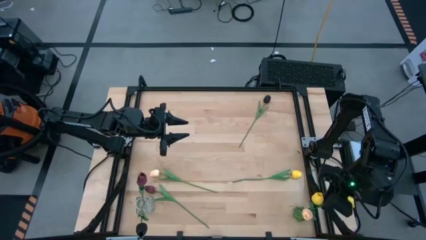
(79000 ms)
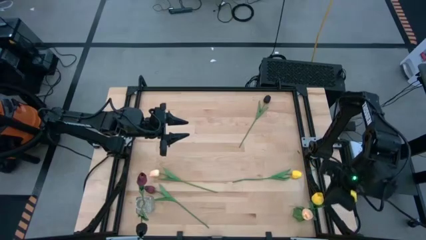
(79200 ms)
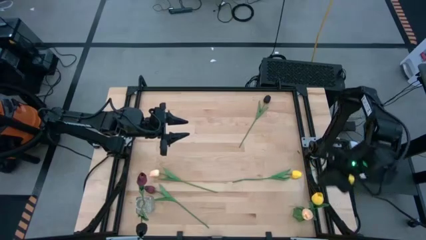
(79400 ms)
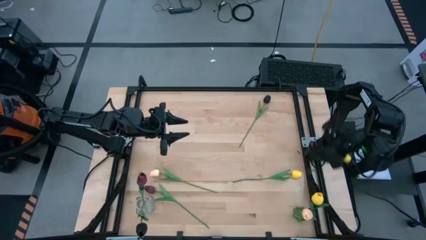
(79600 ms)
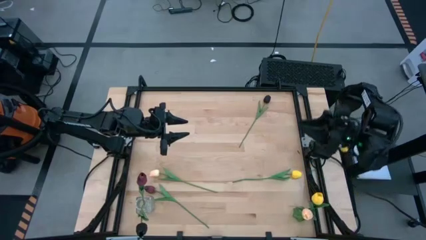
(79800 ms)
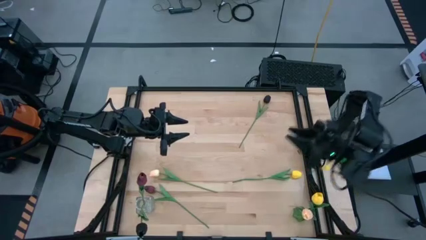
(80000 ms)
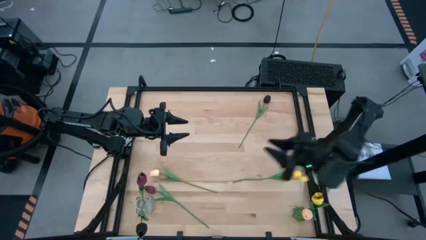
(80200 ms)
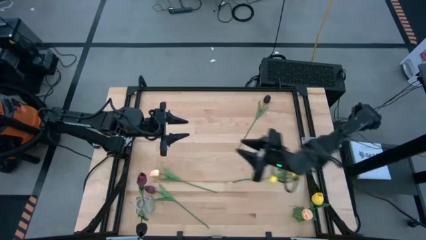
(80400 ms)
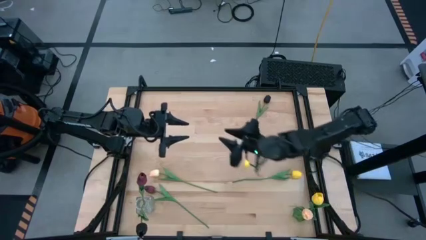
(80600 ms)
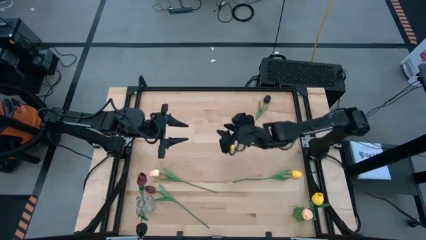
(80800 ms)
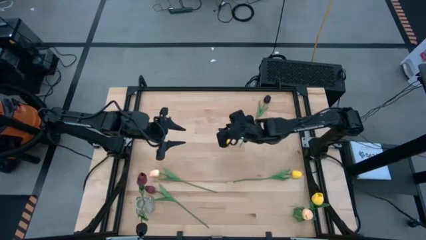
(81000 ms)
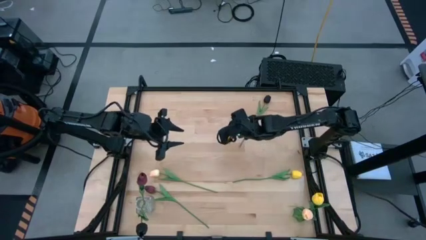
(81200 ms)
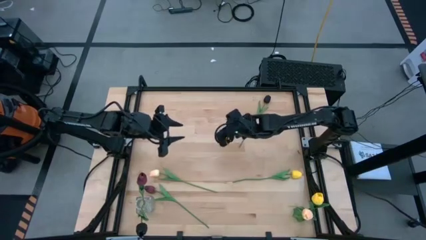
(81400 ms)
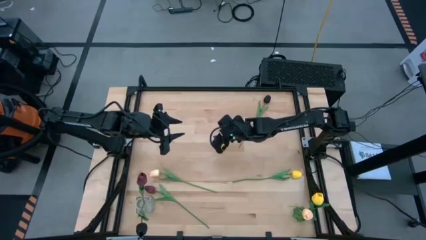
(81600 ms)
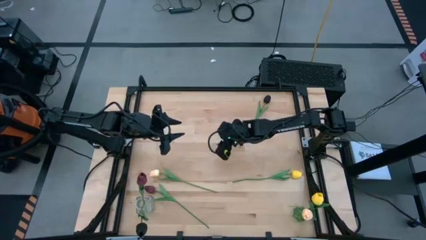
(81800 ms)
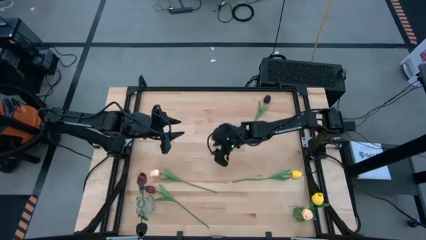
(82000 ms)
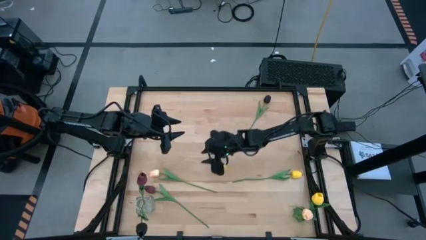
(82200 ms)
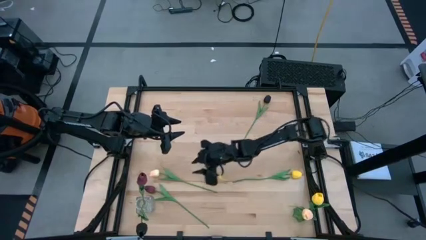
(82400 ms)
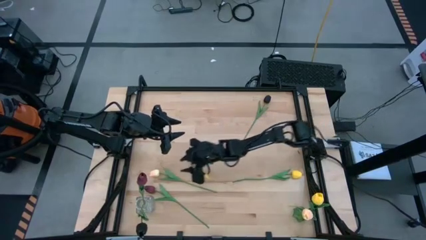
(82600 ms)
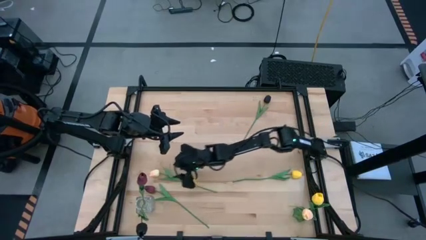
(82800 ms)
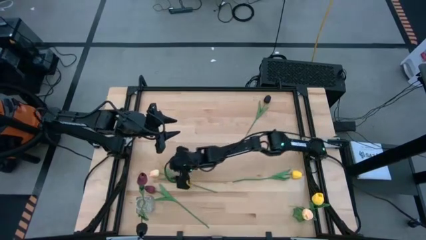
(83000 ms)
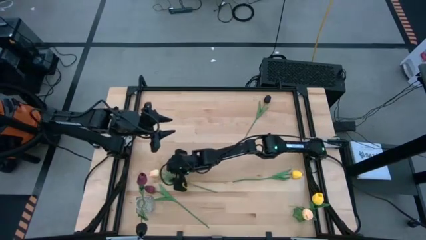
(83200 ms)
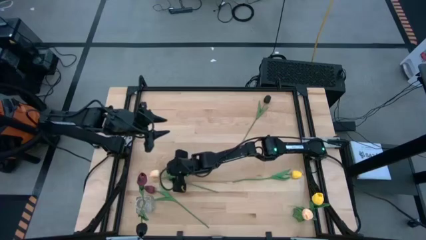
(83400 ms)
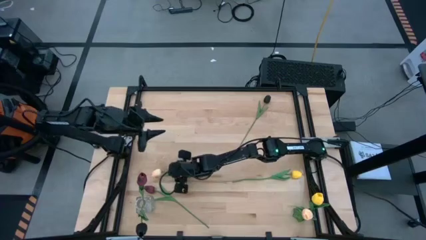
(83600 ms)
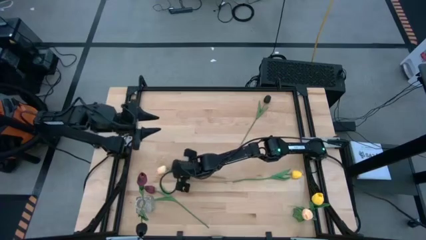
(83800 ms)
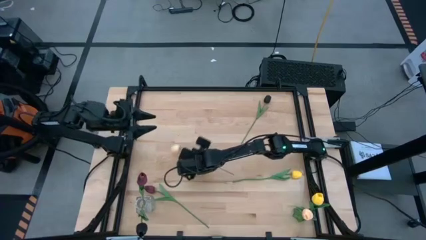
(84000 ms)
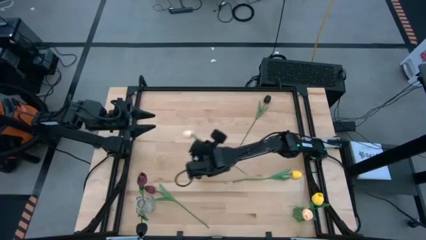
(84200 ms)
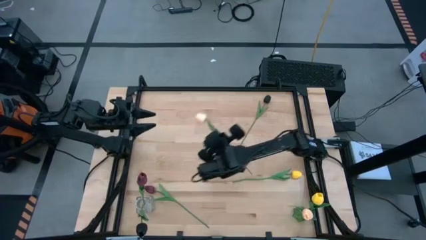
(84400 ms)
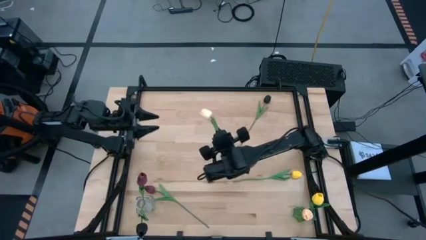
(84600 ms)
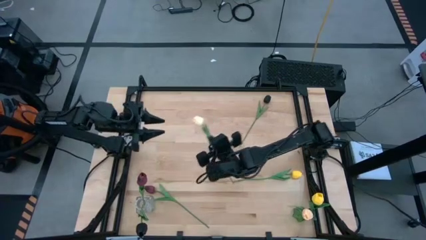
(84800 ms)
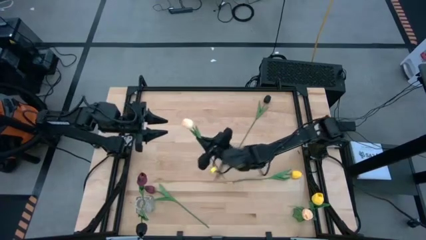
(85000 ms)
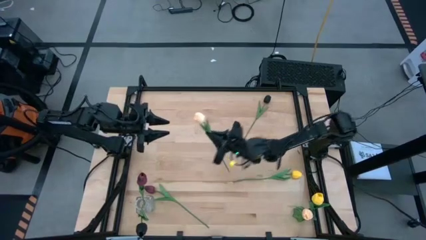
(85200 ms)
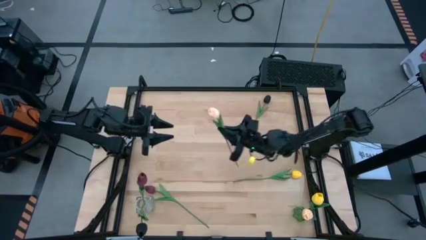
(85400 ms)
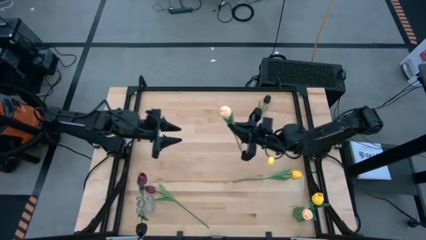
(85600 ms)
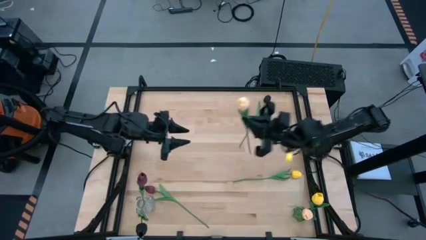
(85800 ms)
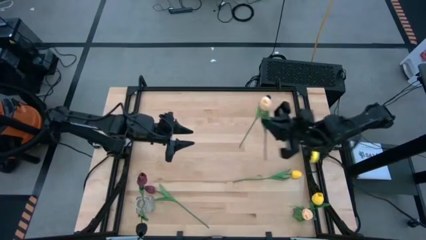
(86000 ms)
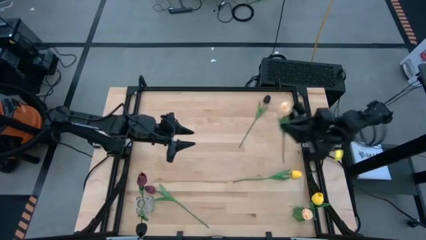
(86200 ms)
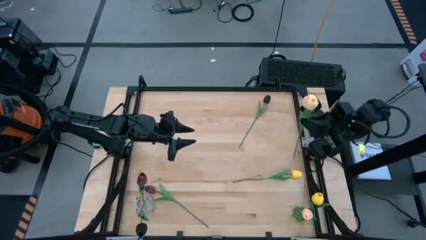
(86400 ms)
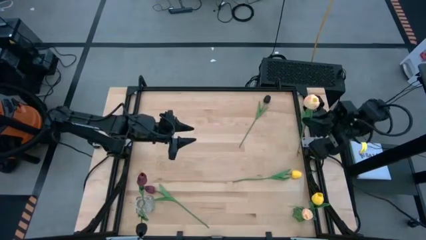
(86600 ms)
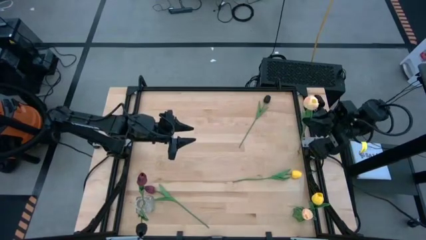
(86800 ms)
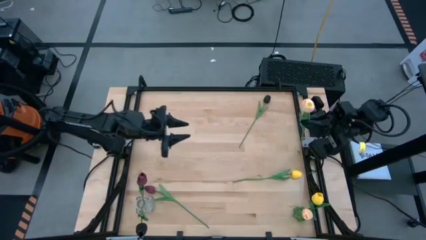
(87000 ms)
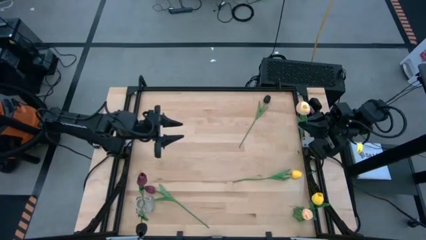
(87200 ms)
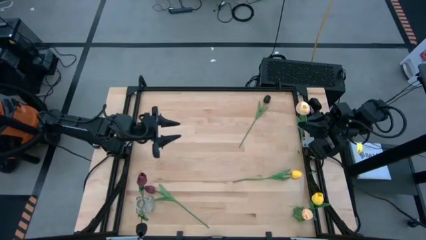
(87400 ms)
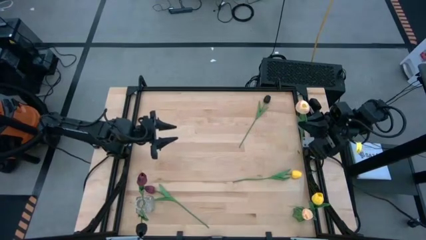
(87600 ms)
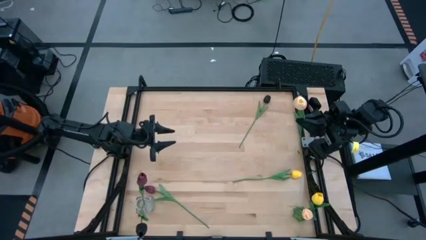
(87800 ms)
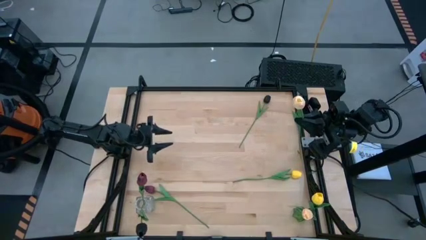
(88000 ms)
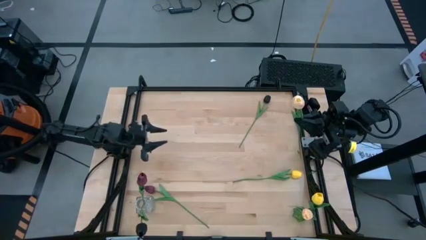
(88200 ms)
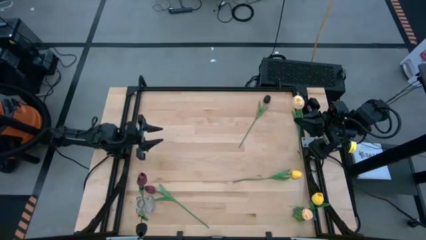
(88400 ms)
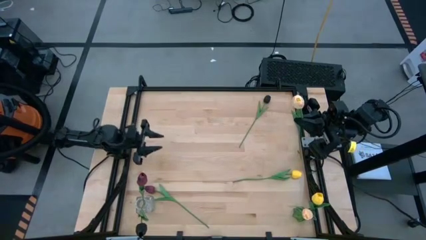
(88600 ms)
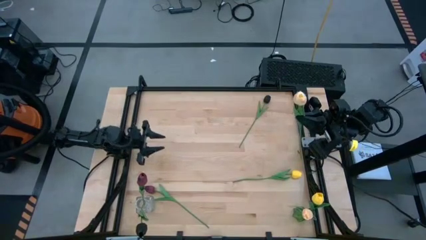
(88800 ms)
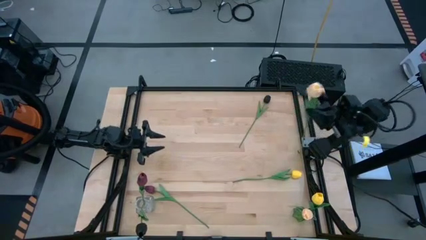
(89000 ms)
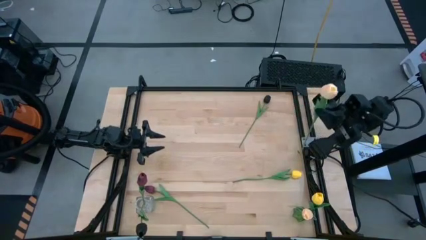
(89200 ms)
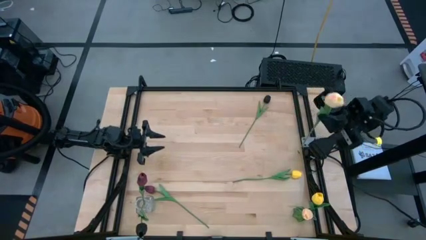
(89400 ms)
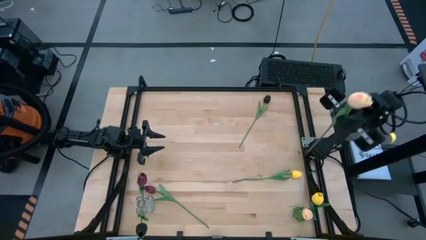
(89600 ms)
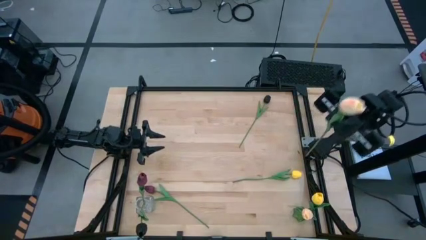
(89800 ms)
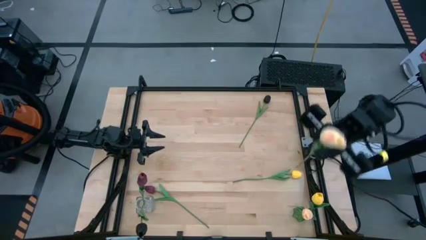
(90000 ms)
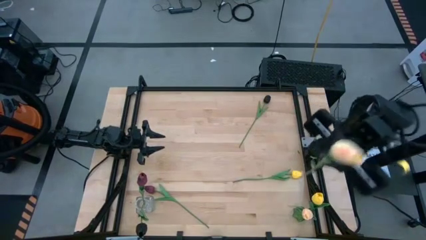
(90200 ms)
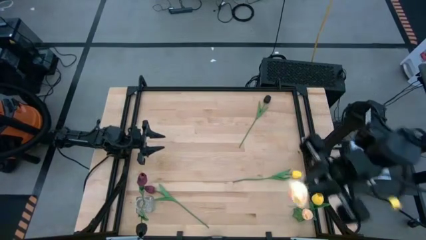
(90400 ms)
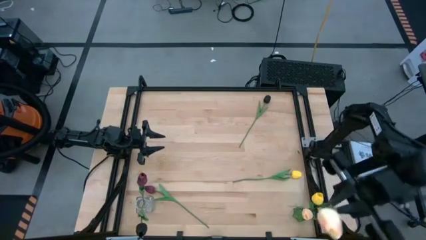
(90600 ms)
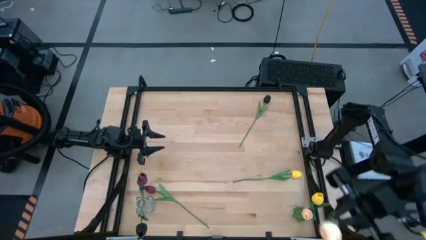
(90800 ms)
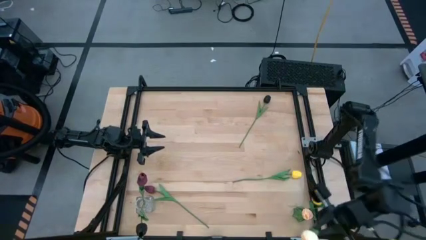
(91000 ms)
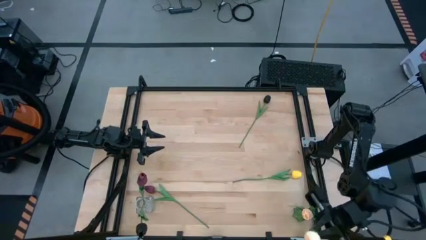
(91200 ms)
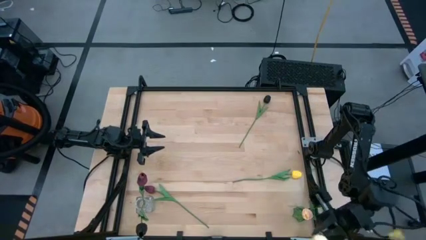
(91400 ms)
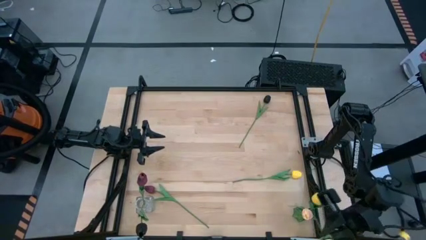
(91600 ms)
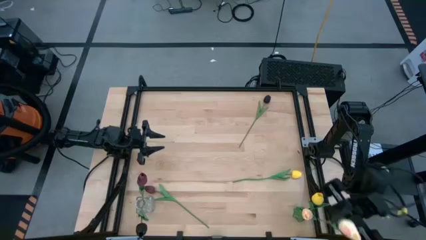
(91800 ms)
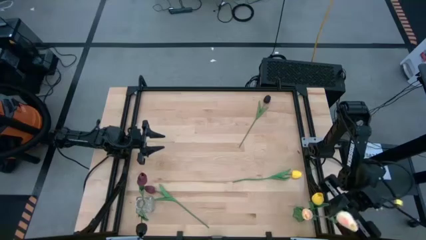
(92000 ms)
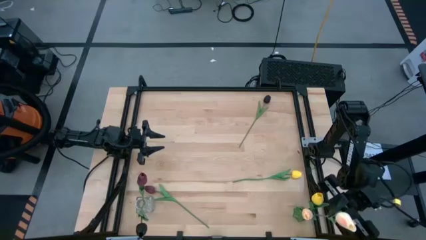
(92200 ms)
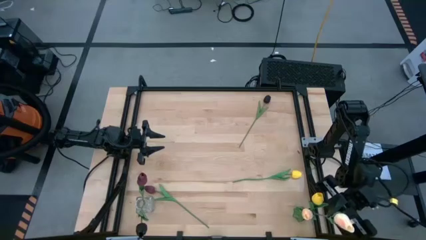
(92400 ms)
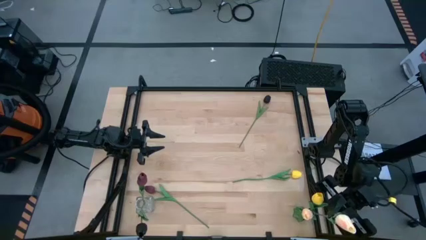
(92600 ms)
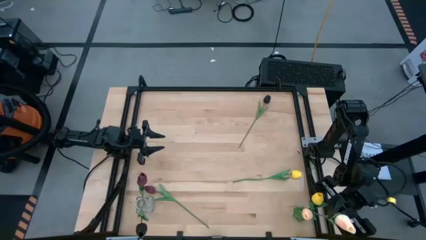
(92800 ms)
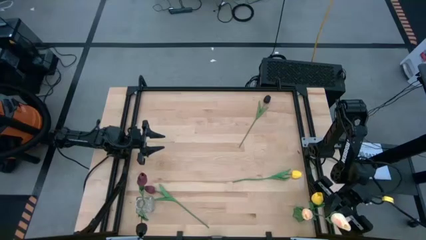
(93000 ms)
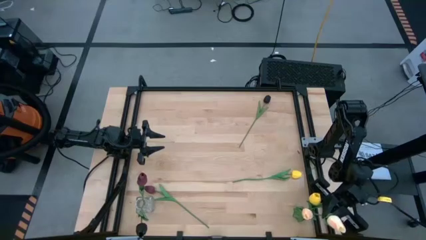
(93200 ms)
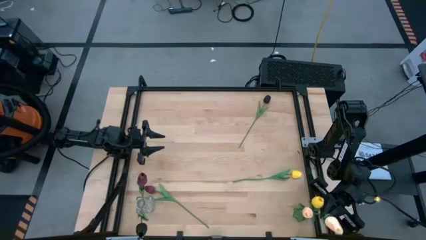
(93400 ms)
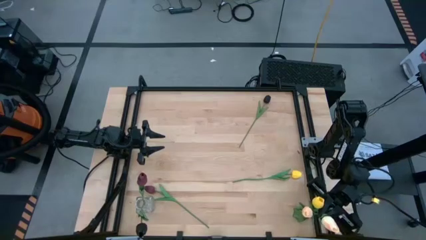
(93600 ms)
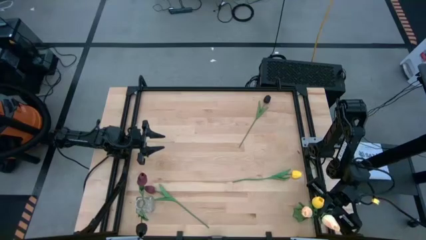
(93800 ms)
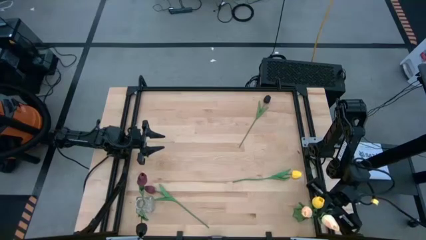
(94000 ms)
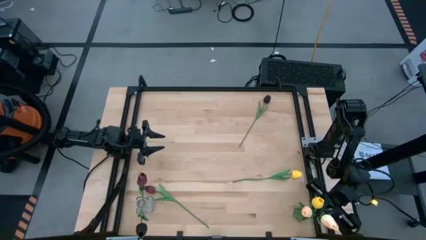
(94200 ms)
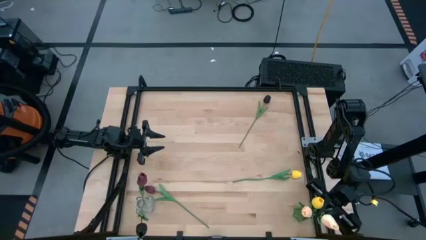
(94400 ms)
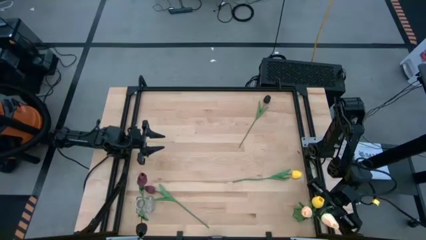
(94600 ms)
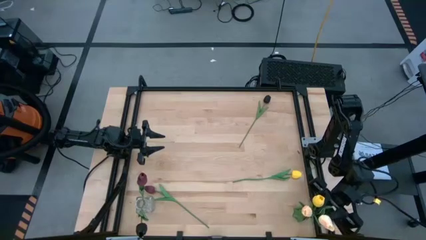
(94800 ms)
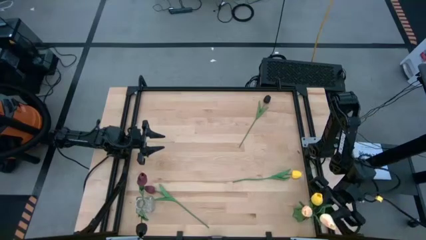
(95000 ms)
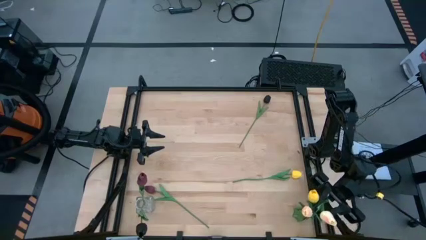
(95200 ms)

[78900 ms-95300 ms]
Task: Sort flowers into vase by color
Put the pink tulip into the green vase

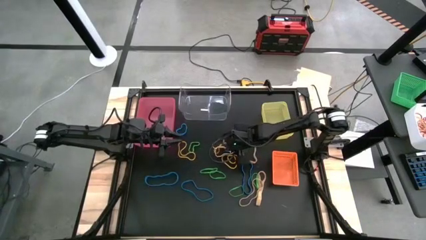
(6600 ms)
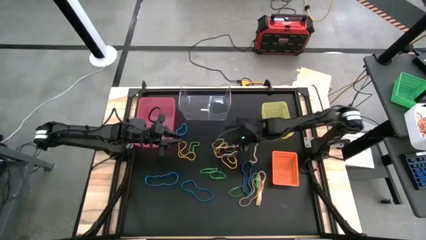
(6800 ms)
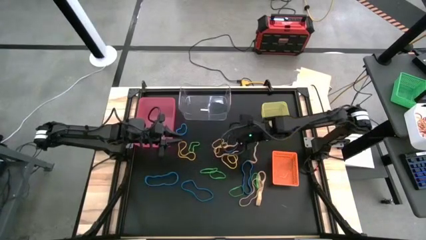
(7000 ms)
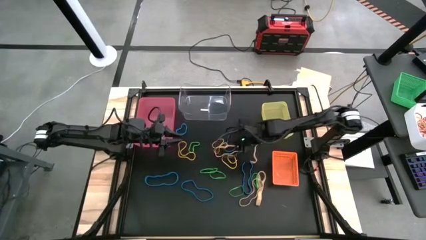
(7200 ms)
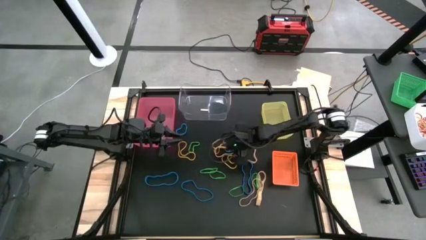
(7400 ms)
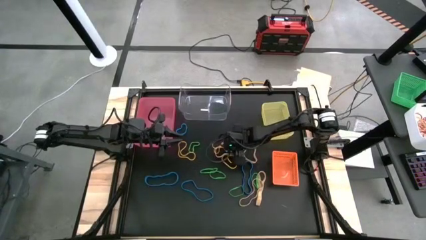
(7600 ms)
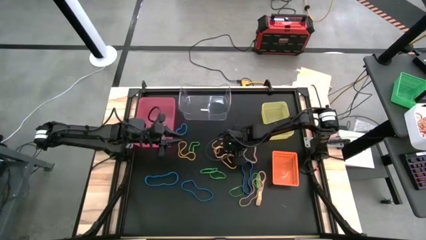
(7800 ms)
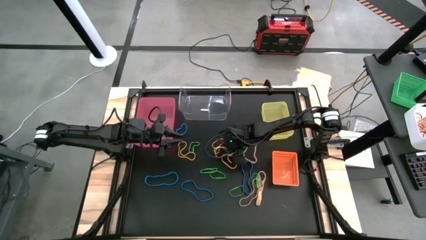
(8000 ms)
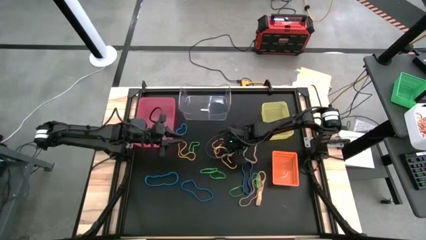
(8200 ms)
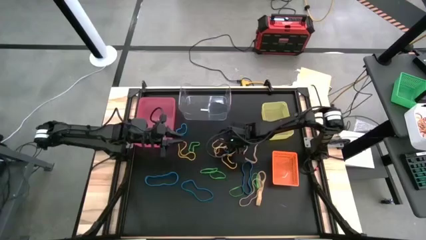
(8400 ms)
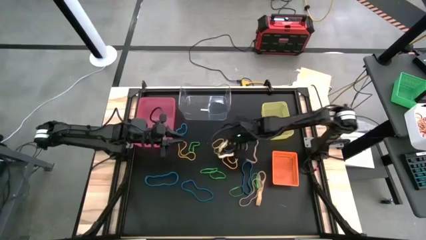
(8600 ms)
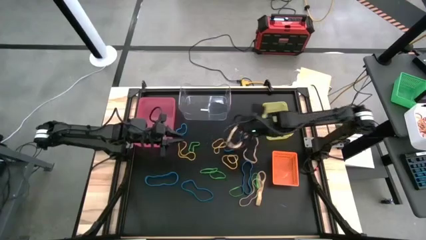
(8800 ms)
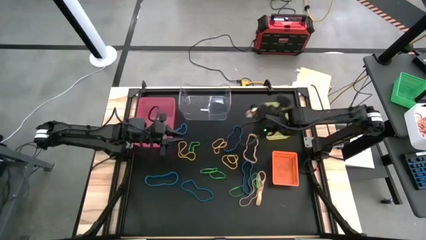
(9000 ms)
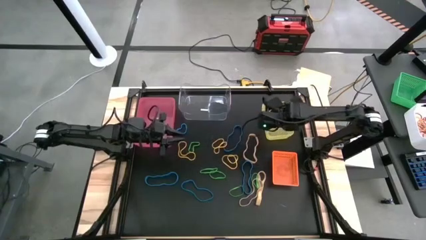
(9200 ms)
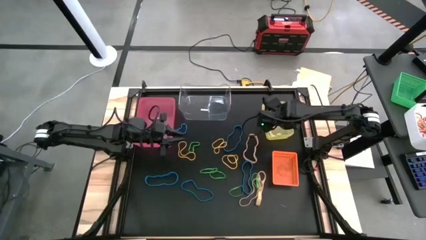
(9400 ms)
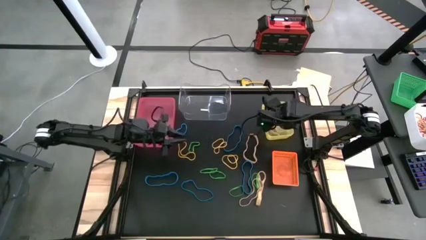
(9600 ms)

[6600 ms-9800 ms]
Task: Sort rubber bands into baskets
Put the light orange rubber band into the yellow bin
